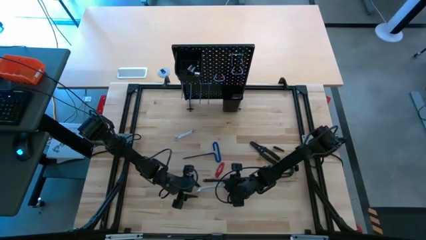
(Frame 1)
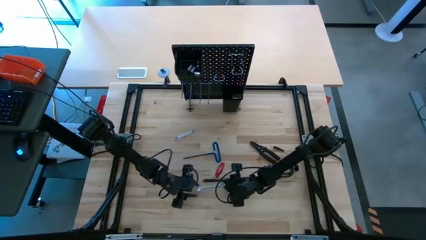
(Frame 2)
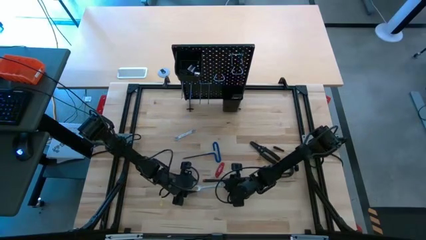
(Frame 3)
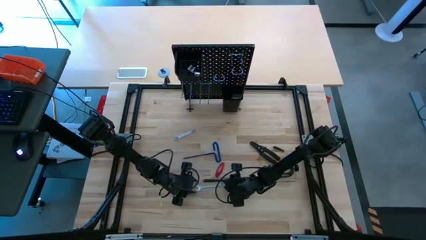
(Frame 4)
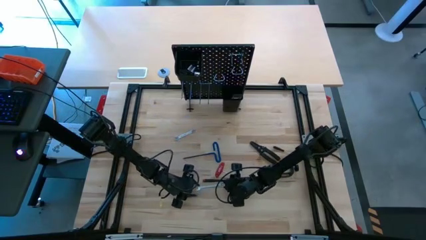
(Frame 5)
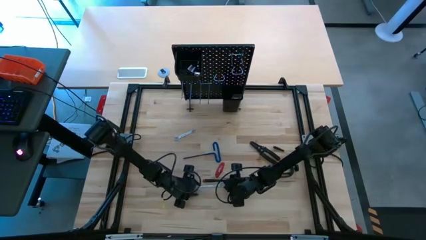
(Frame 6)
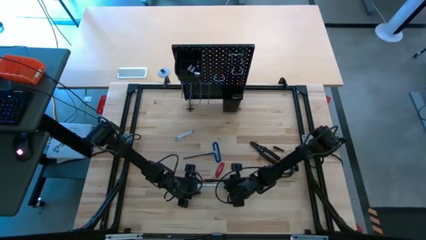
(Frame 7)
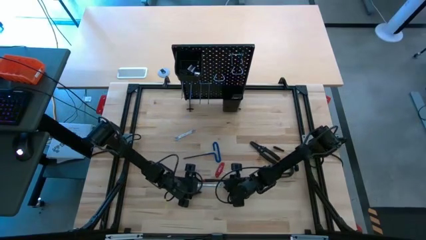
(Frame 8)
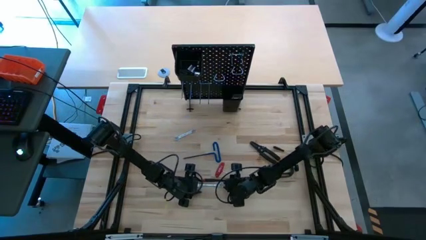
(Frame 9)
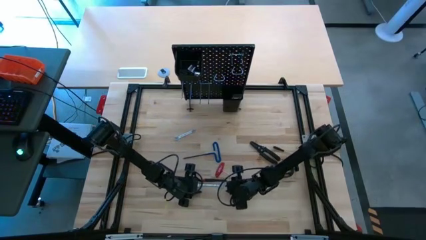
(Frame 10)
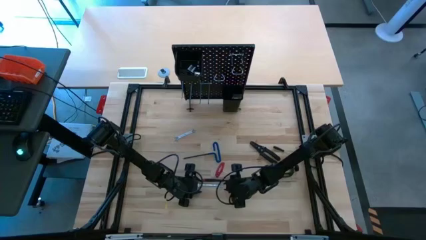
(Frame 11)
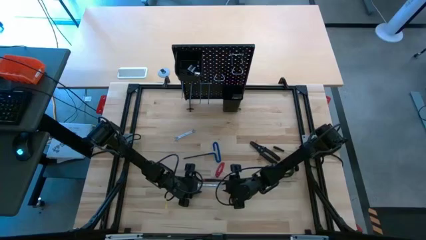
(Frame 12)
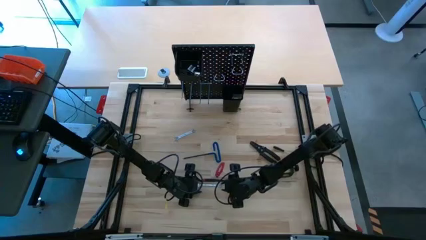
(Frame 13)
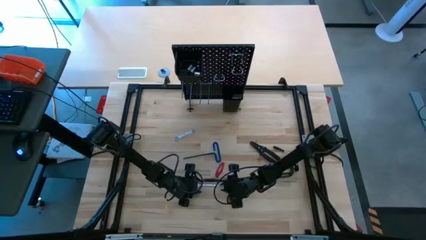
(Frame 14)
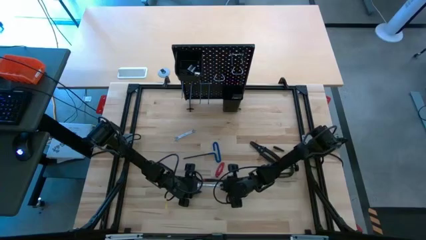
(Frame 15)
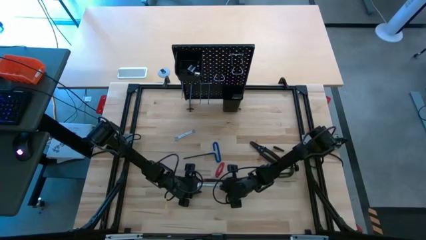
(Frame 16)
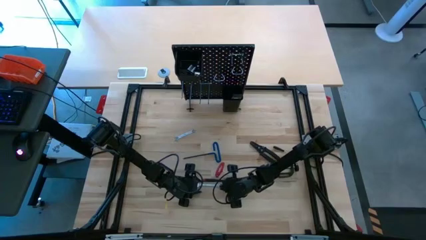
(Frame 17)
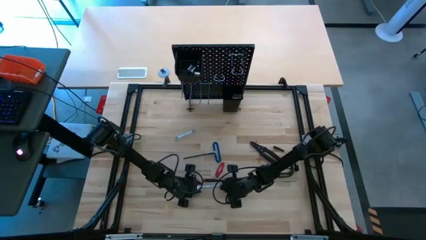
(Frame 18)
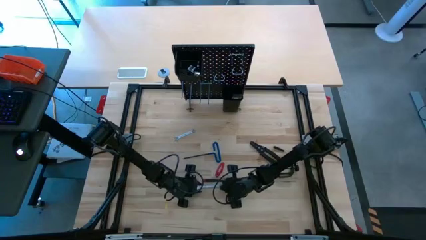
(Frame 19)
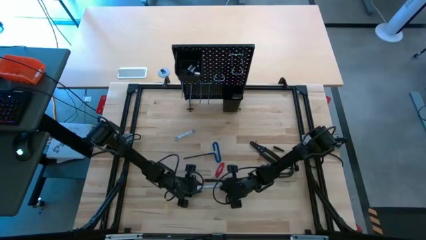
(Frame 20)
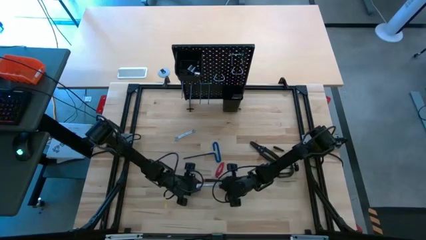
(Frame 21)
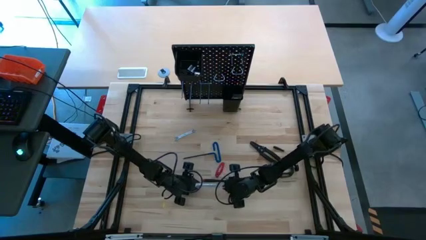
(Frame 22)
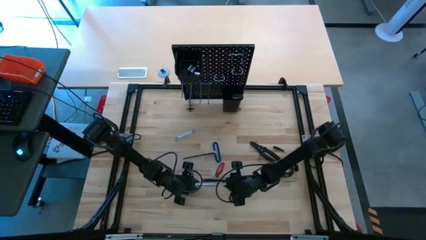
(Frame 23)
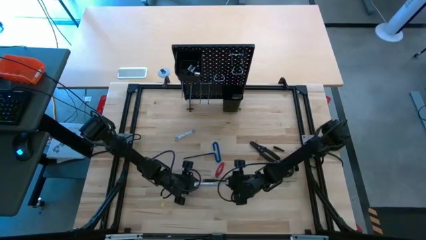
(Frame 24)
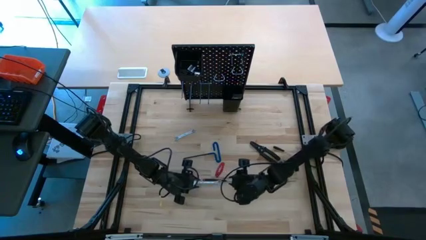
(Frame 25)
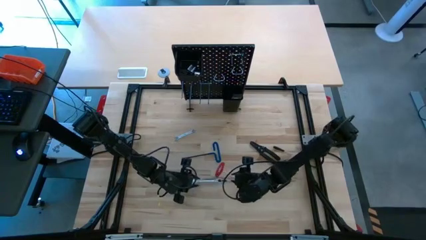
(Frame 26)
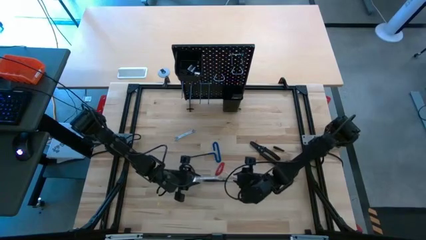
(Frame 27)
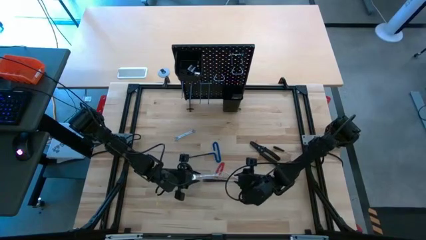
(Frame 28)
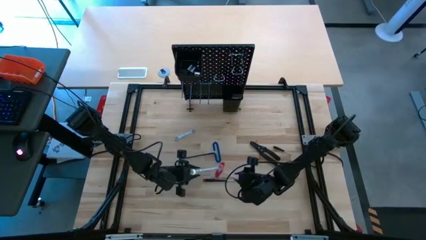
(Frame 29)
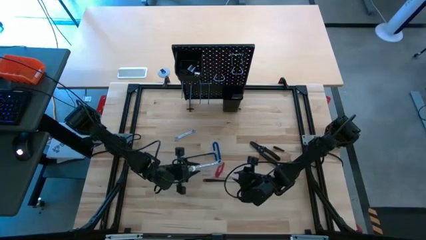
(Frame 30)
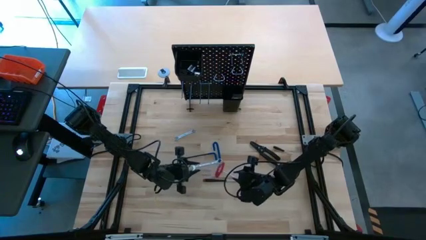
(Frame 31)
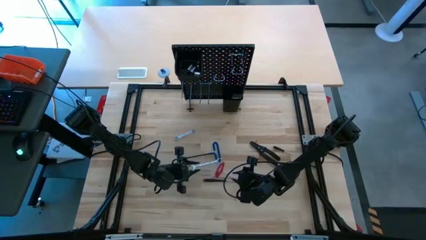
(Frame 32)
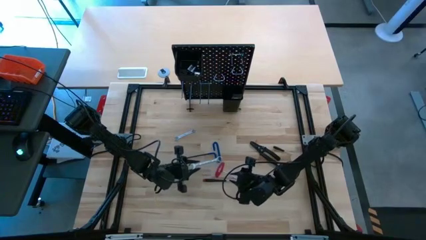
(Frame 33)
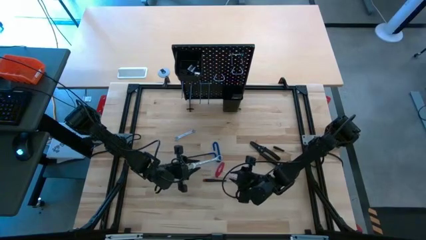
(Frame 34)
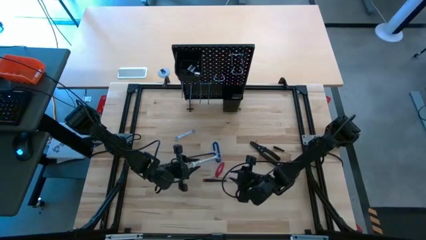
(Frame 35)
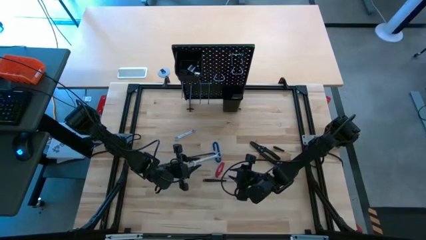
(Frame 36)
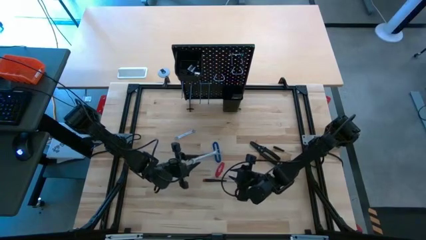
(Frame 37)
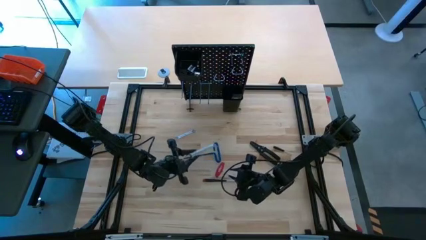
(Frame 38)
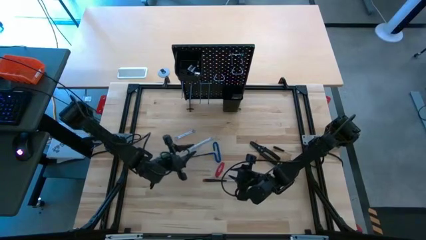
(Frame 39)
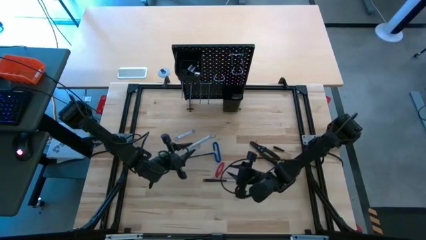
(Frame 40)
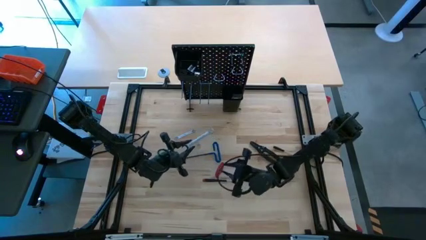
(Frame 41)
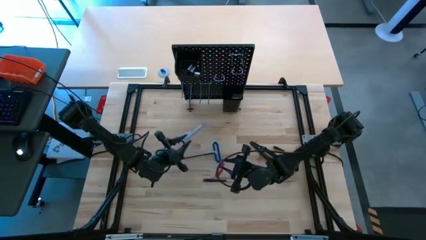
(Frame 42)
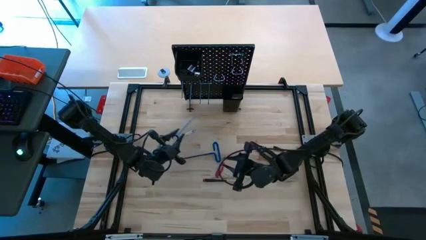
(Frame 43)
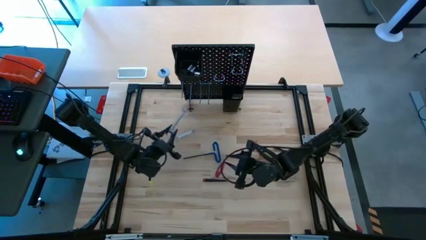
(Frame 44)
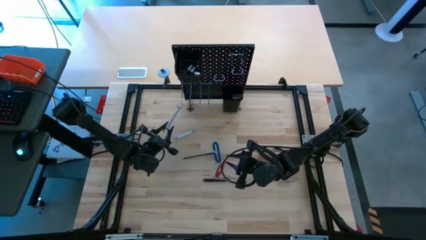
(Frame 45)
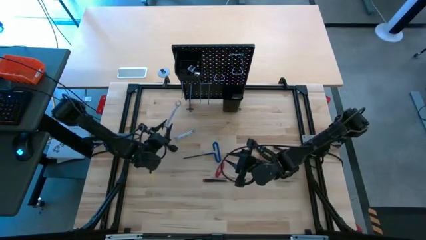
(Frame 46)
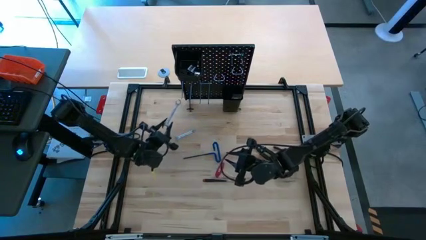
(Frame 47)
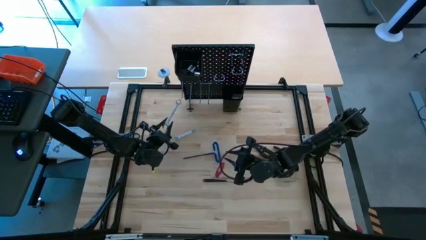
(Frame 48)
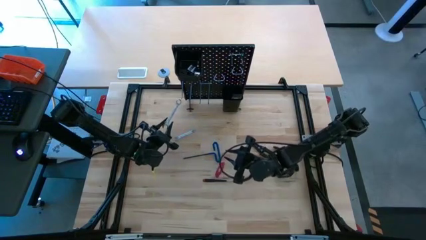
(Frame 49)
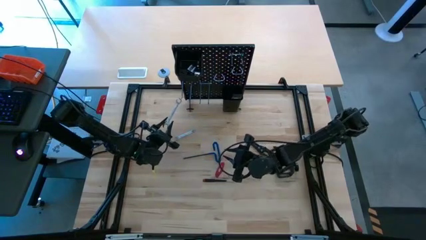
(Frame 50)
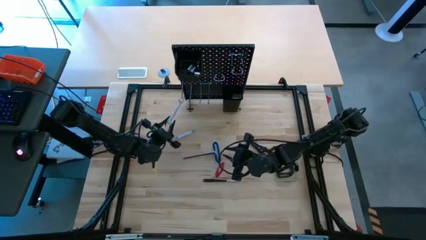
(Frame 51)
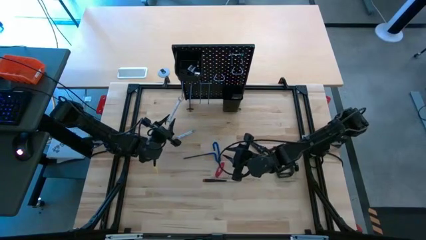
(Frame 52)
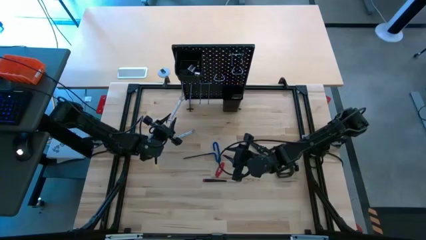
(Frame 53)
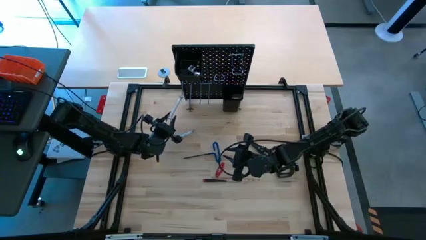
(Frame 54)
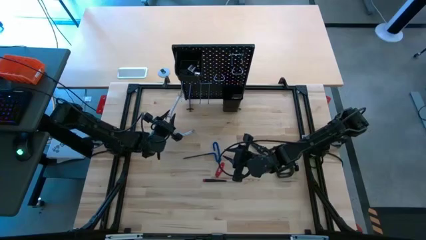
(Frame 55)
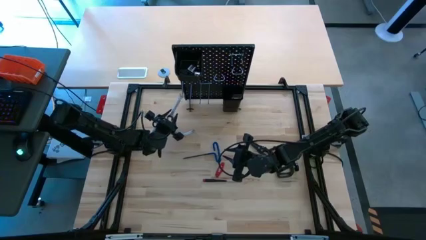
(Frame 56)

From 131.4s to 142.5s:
Task: Hang tools onto peg board
Hang the wrench on the pegboard
